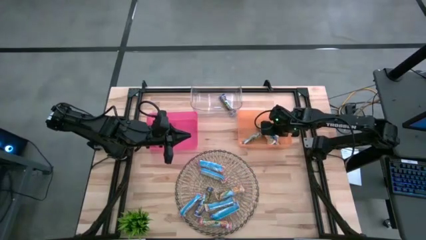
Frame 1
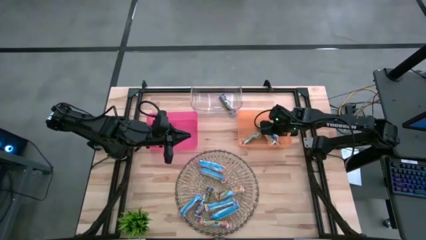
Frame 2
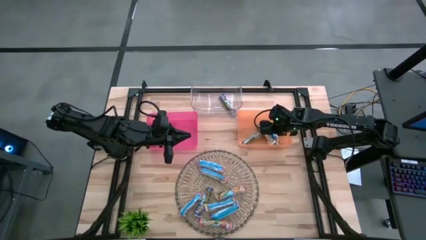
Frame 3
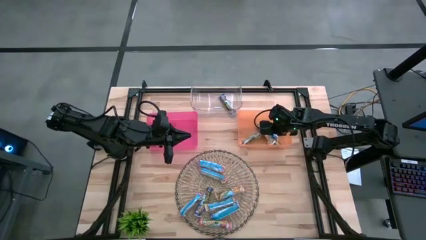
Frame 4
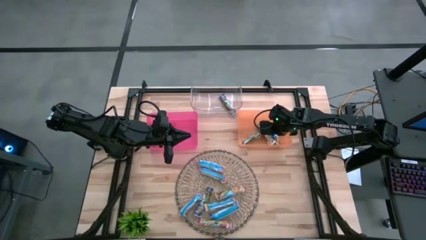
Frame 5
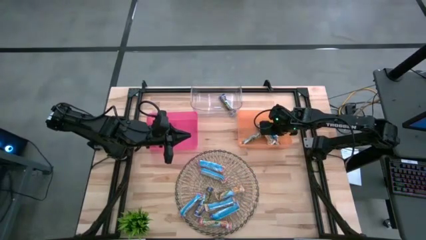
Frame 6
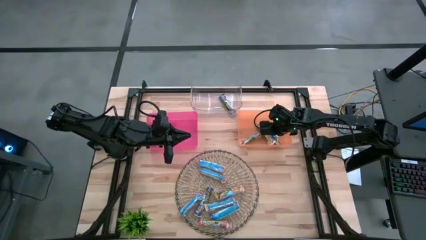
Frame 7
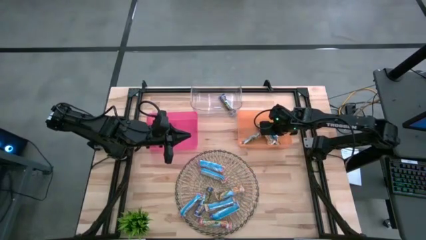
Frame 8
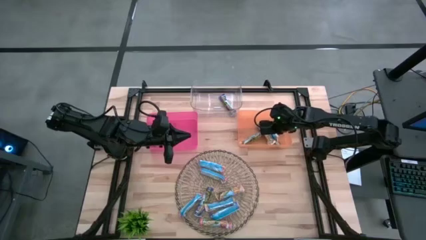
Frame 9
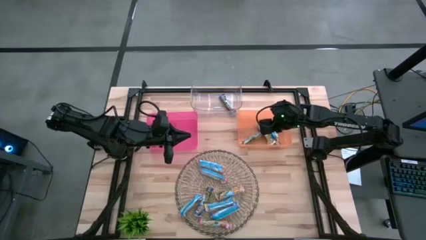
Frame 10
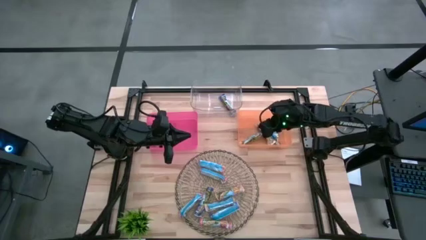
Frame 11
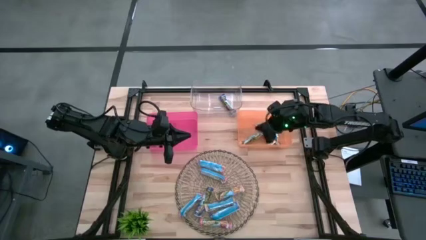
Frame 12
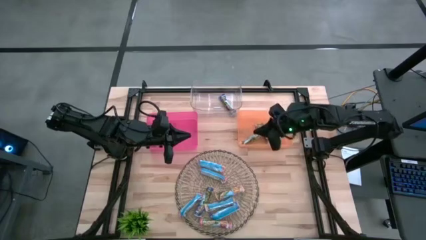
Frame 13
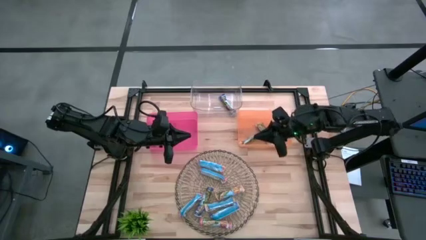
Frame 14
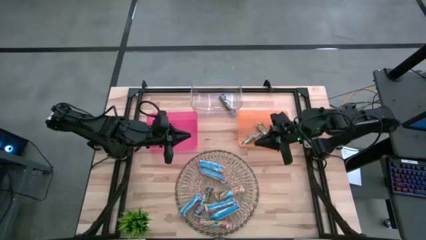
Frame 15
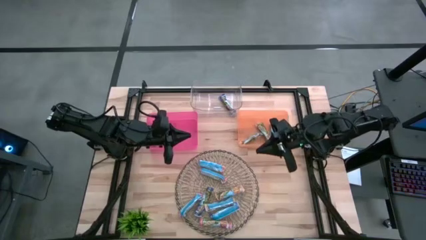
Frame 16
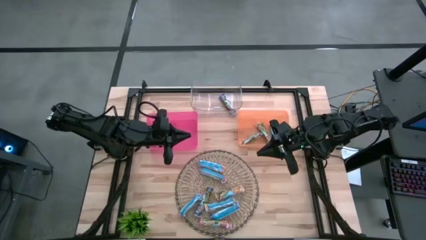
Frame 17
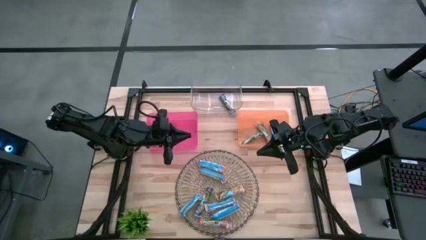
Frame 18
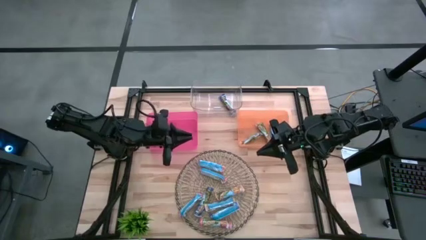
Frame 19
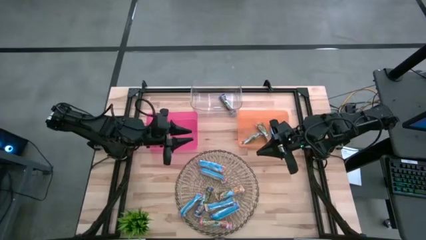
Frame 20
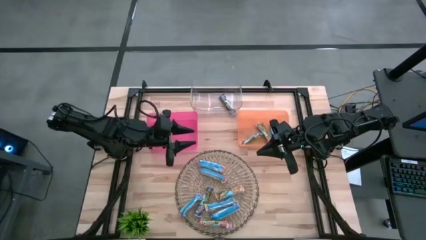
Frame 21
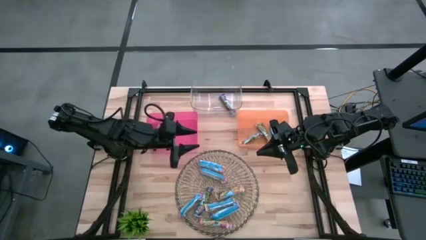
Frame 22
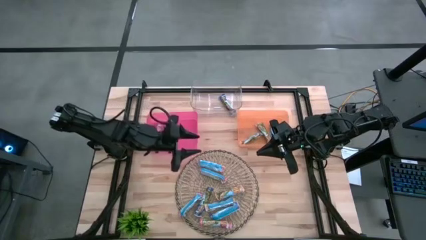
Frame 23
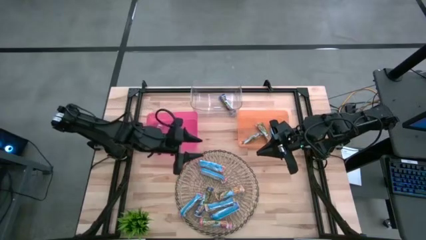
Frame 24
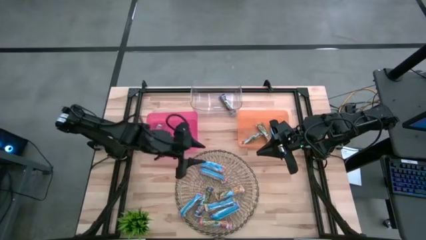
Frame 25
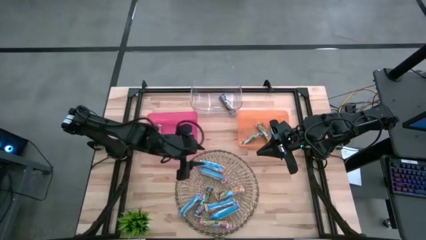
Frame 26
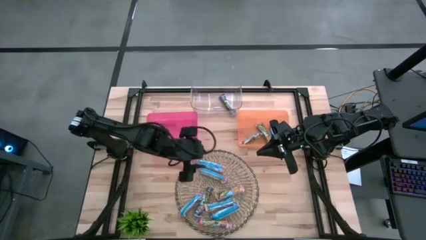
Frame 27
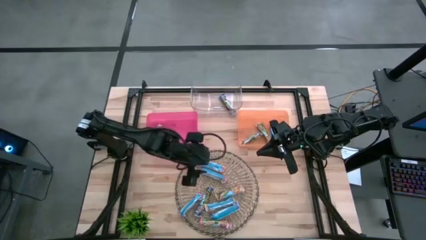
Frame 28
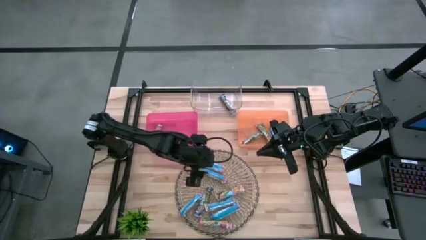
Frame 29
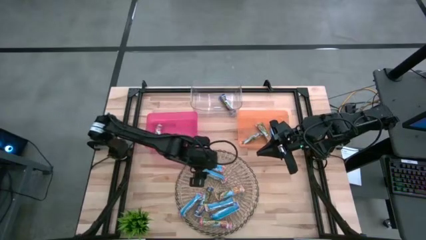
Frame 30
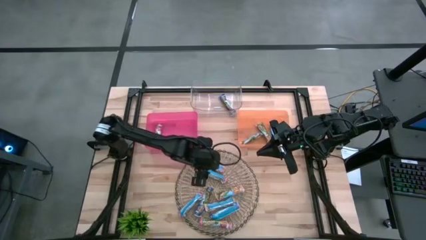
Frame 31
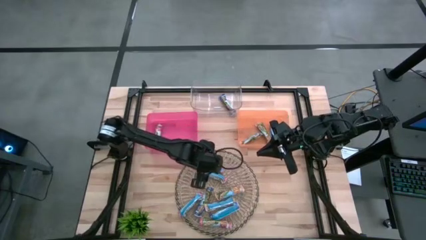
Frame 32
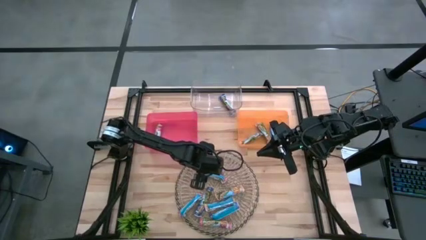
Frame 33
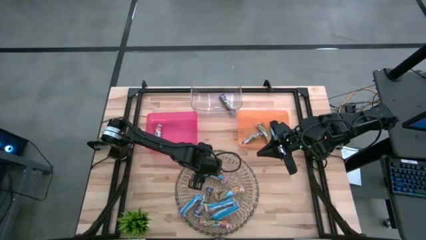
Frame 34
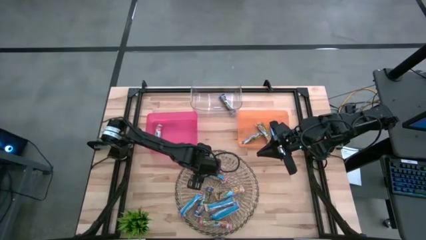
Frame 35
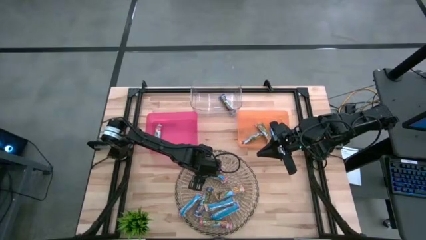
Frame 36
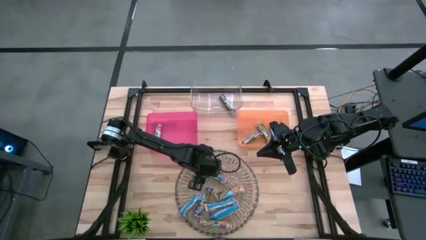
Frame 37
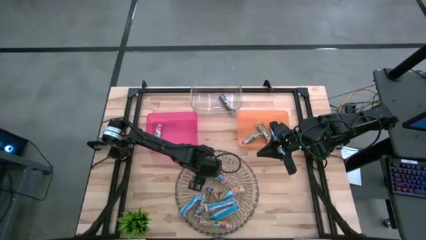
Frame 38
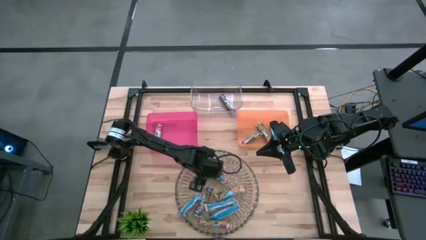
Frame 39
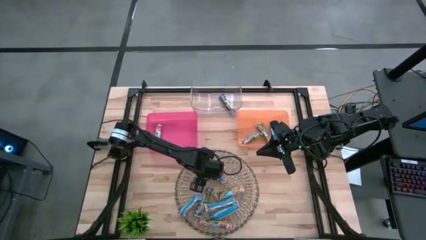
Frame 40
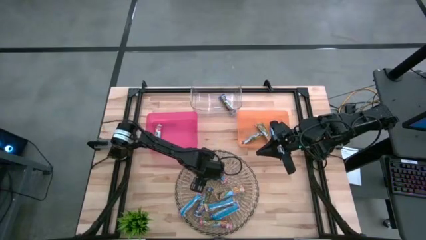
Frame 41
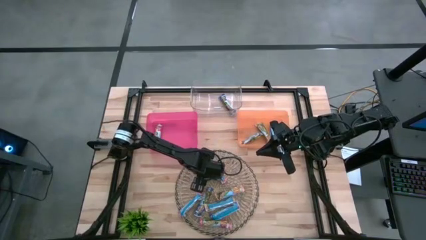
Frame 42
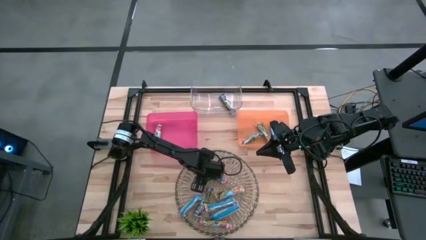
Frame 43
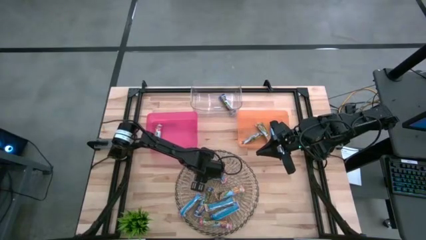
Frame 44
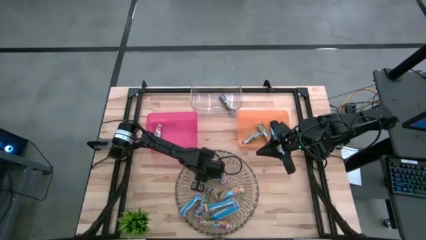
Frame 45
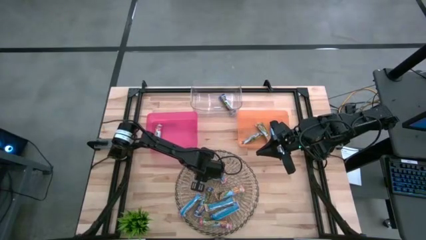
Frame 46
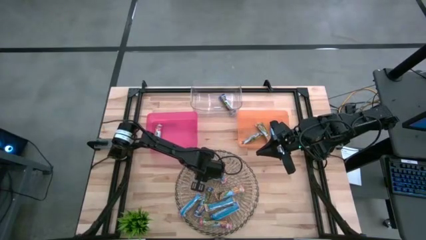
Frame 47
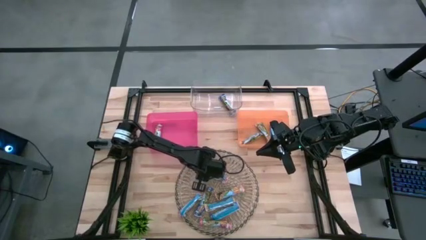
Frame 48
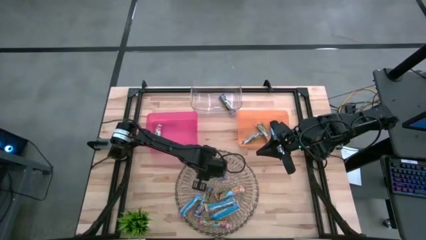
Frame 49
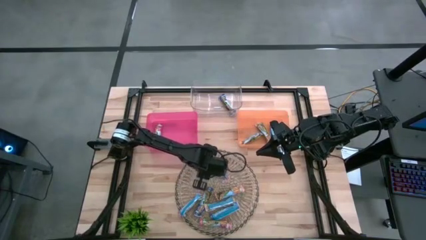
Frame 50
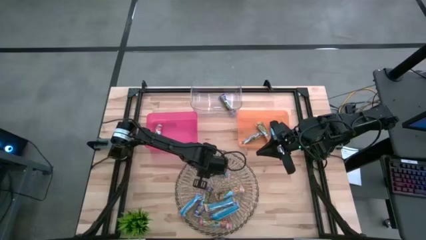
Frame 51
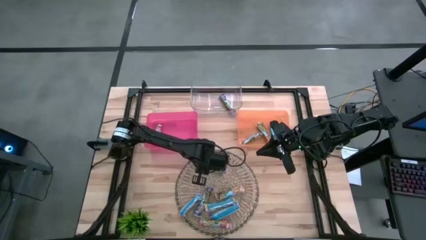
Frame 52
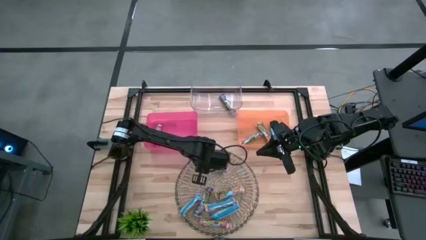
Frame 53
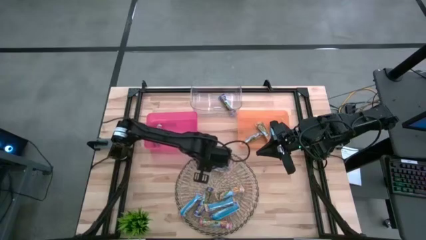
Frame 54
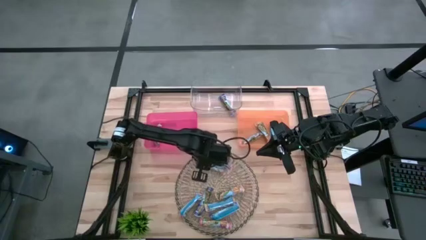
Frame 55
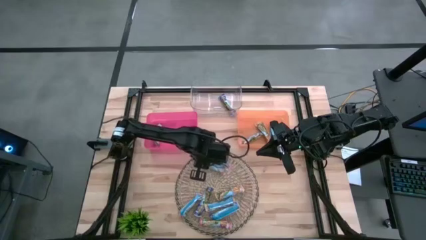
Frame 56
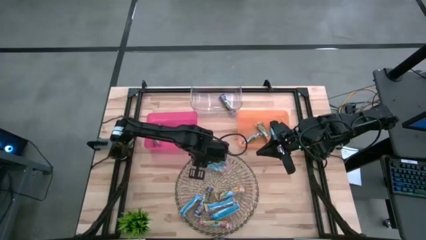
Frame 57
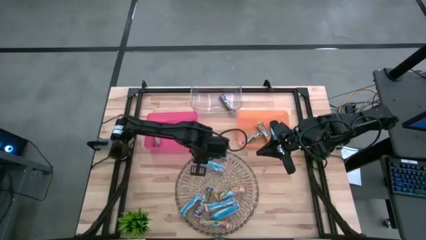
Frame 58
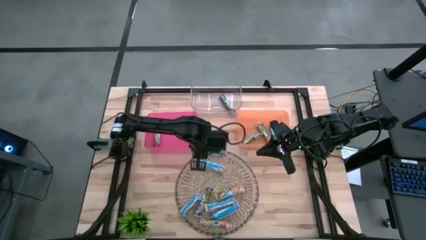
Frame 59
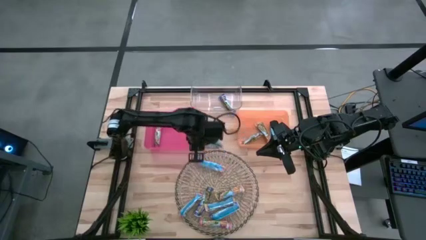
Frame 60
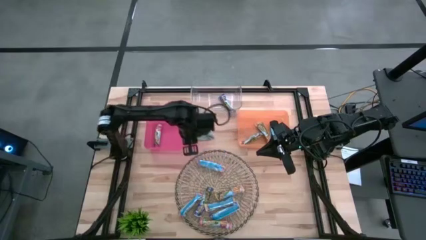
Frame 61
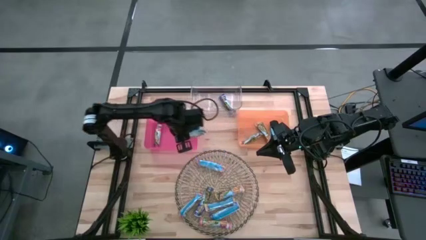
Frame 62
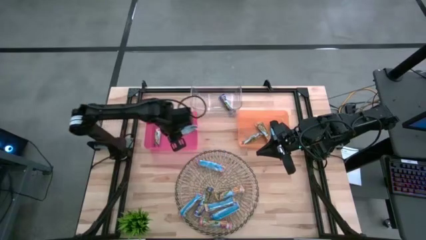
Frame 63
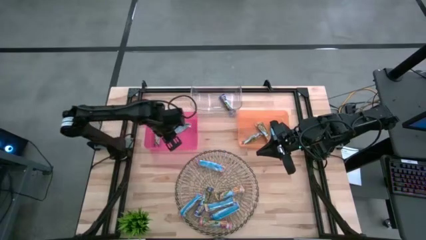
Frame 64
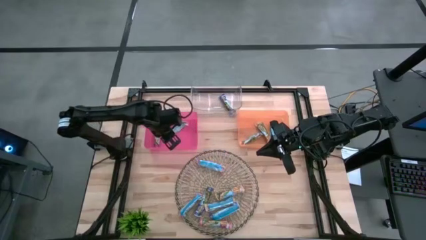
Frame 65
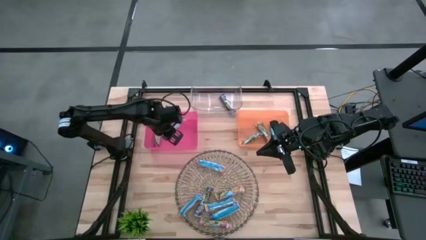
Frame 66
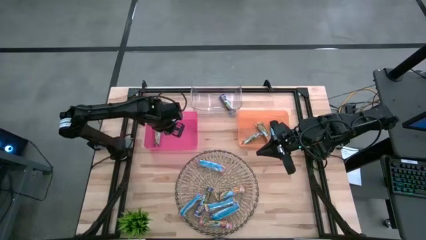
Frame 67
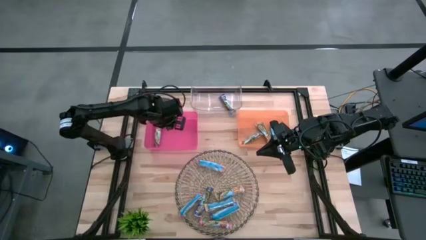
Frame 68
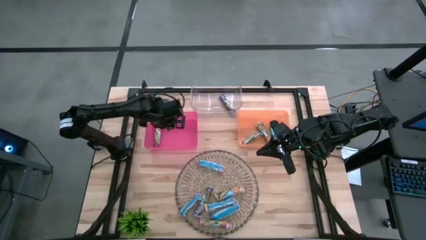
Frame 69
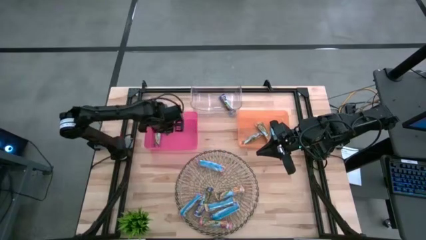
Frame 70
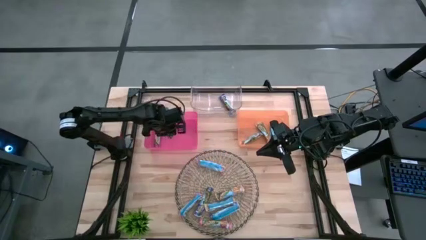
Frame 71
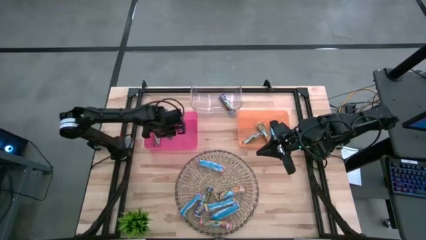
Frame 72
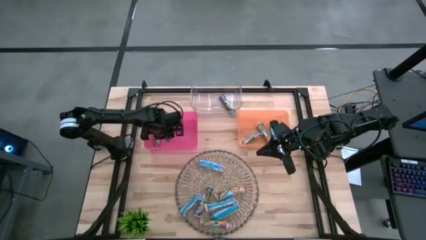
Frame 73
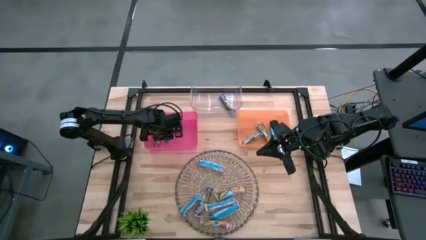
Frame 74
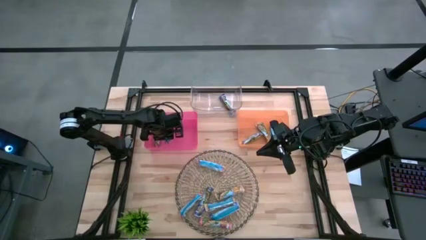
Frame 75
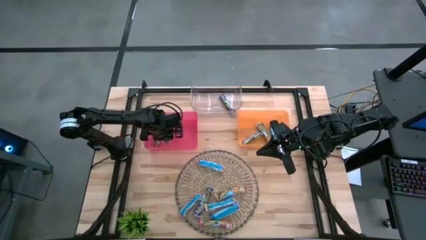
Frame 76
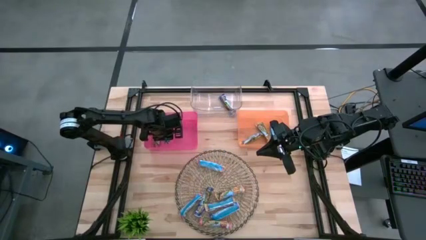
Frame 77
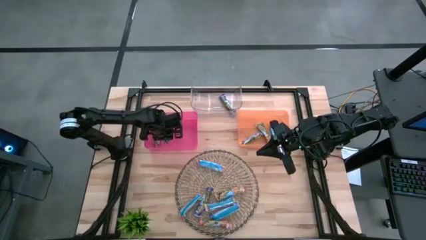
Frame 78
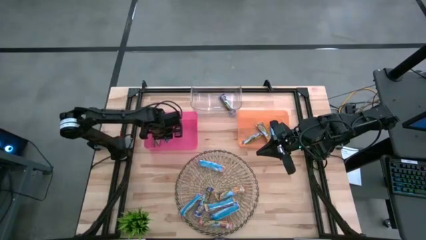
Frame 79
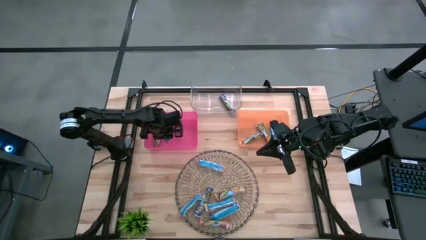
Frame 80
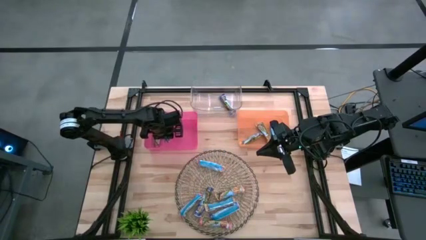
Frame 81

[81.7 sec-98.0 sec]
Task: Pick and place Granola Bars by type
Put the red granola bar into the pink bin
